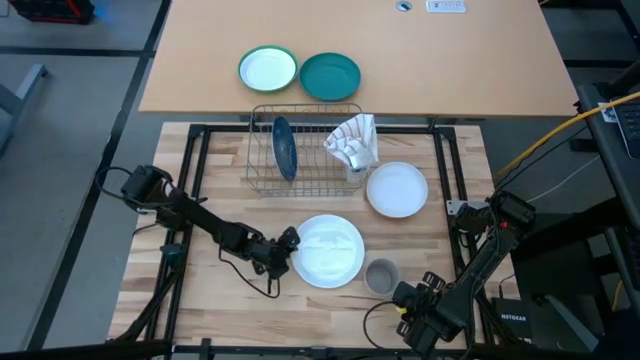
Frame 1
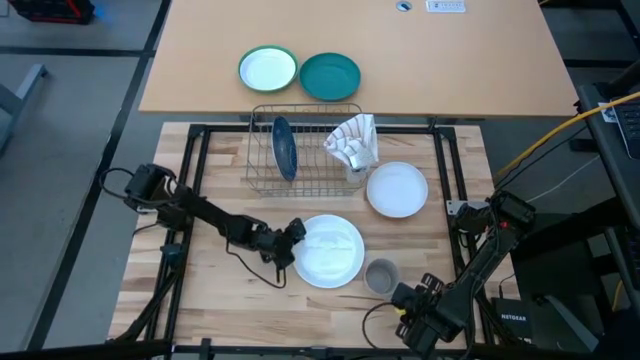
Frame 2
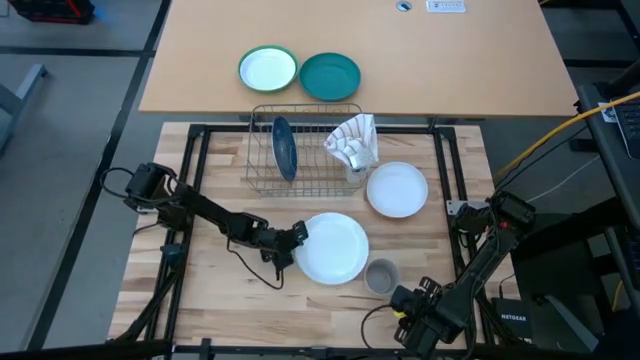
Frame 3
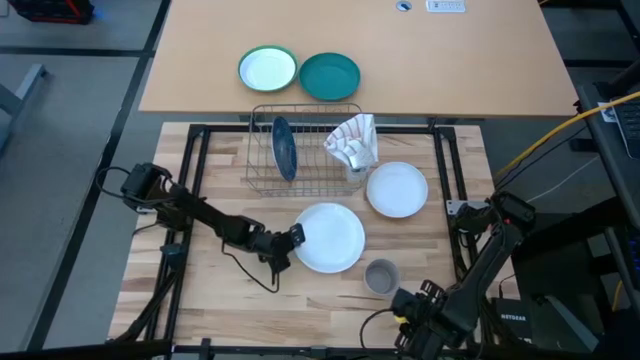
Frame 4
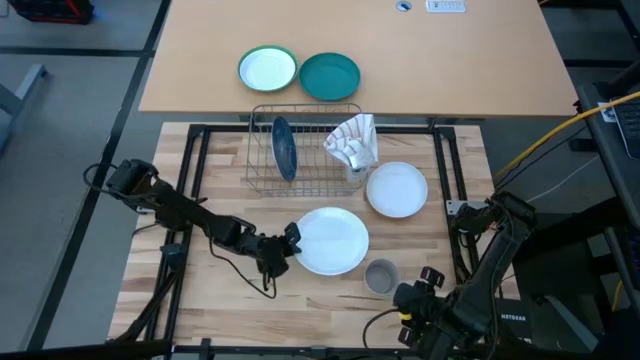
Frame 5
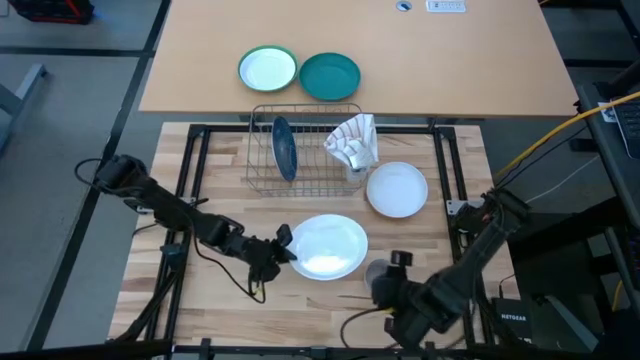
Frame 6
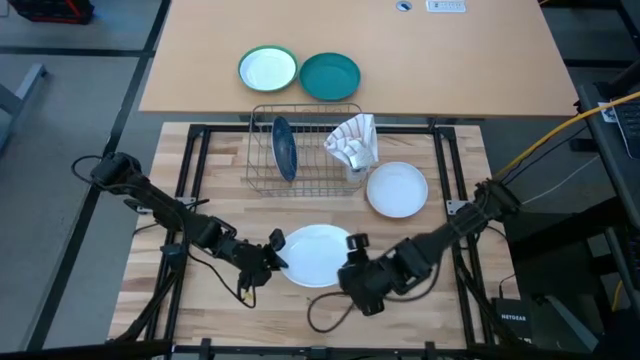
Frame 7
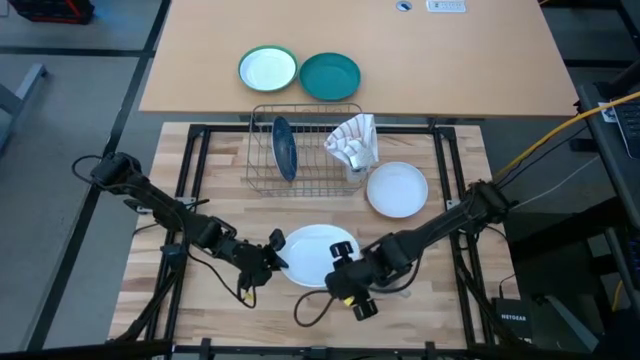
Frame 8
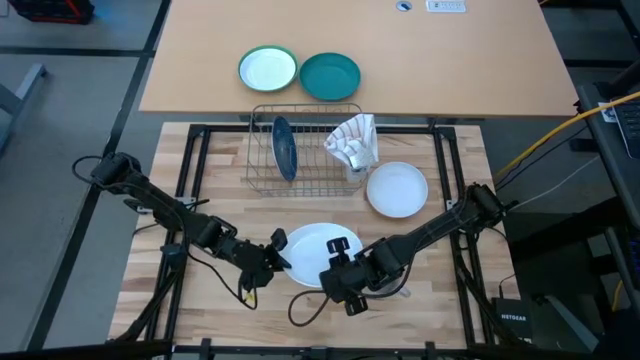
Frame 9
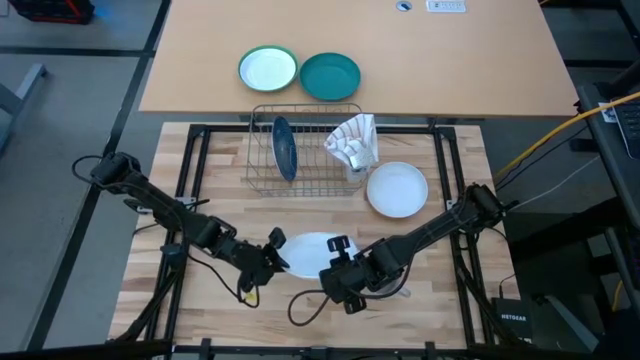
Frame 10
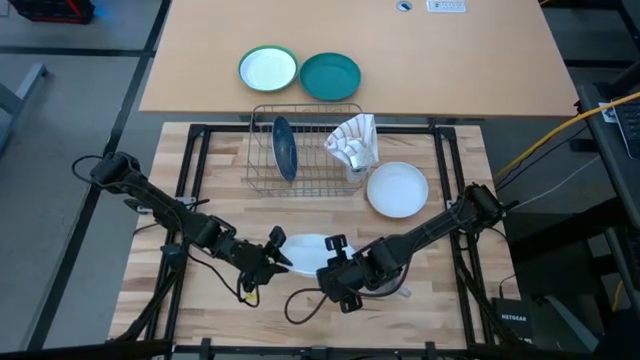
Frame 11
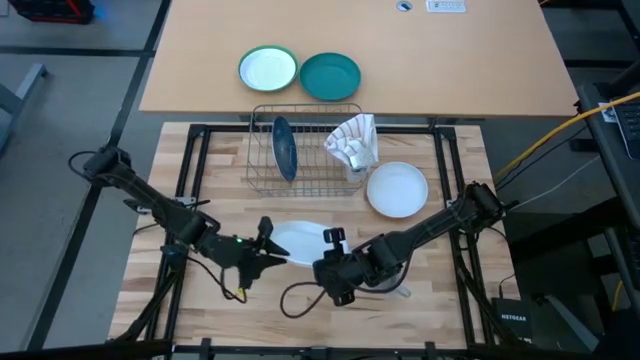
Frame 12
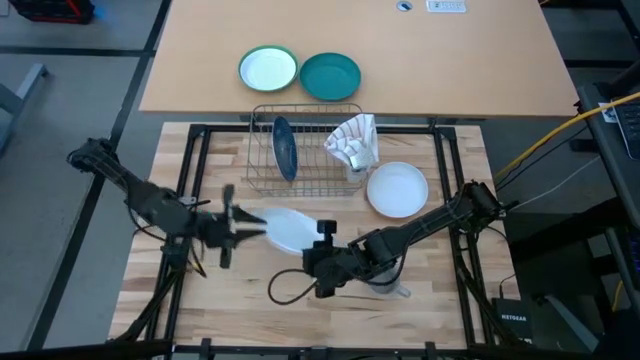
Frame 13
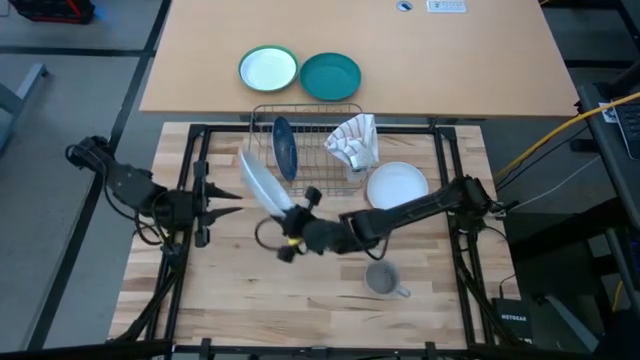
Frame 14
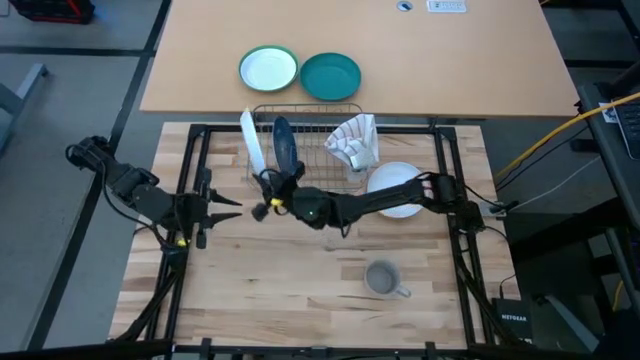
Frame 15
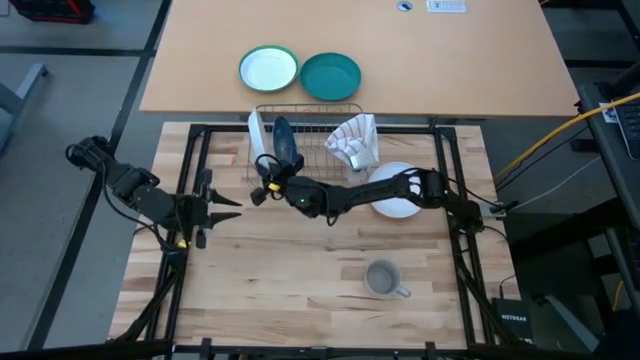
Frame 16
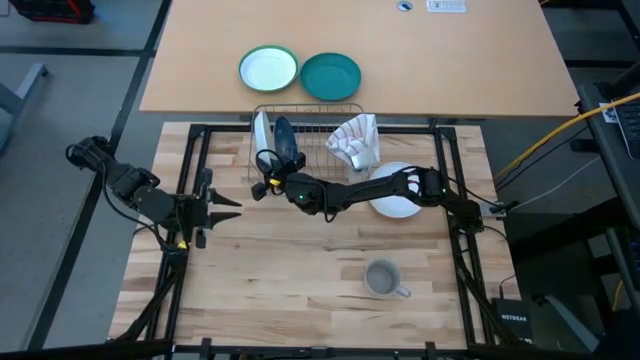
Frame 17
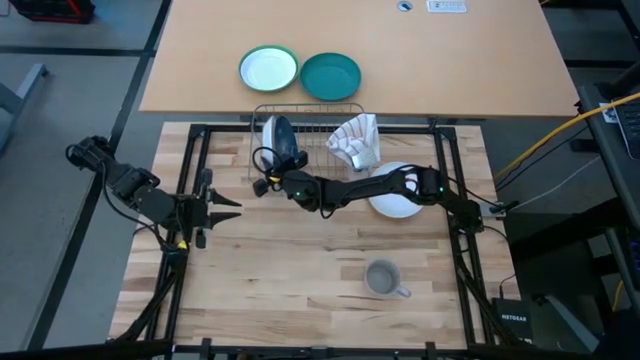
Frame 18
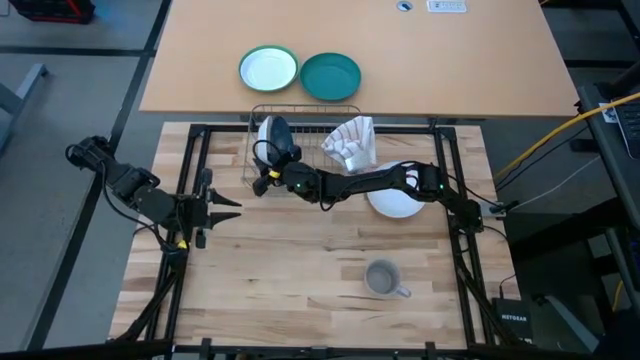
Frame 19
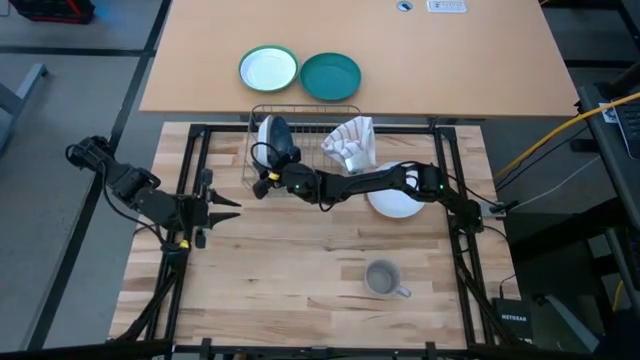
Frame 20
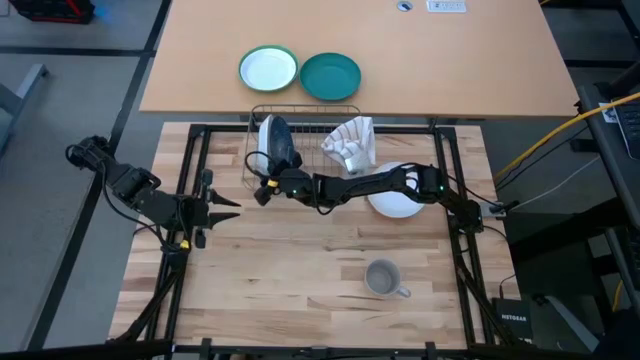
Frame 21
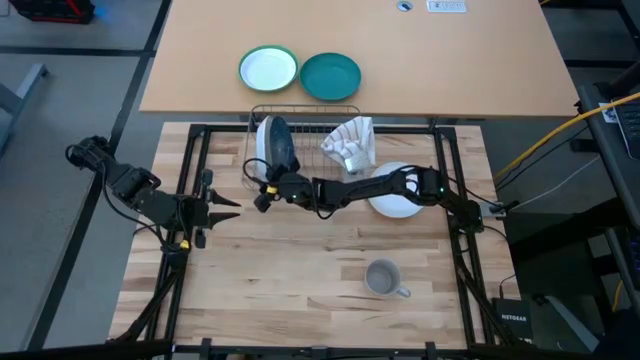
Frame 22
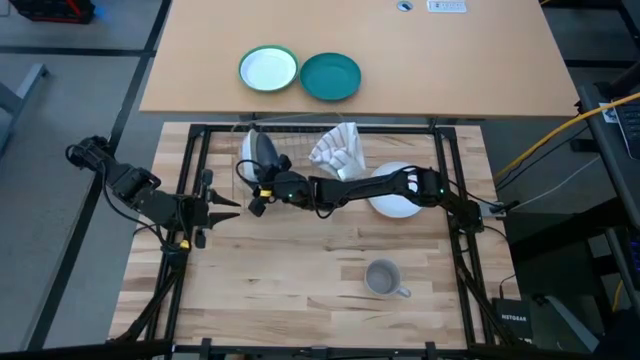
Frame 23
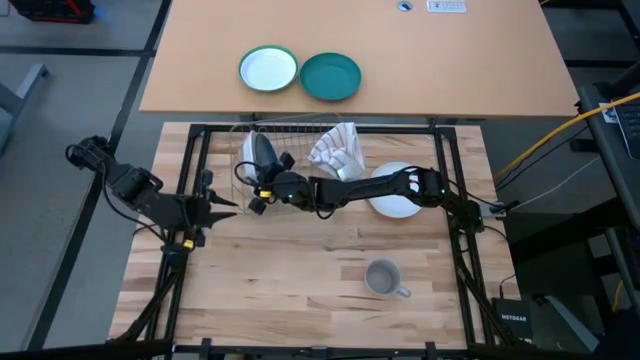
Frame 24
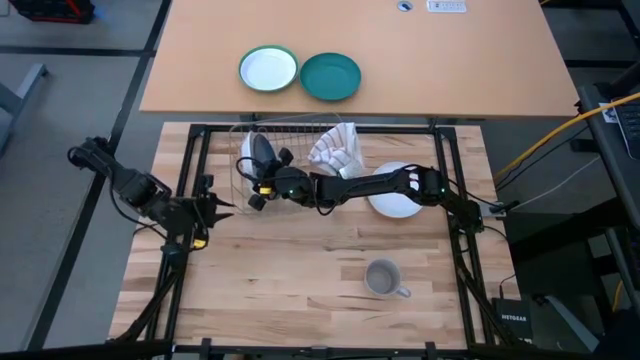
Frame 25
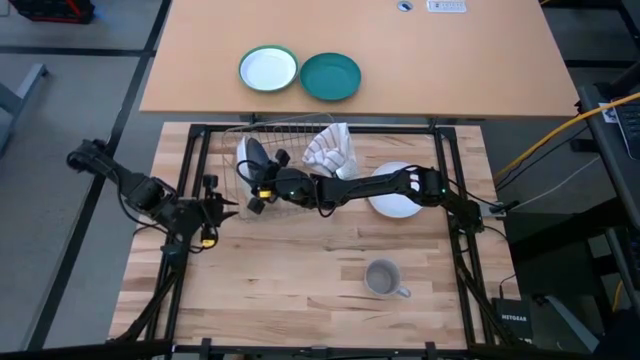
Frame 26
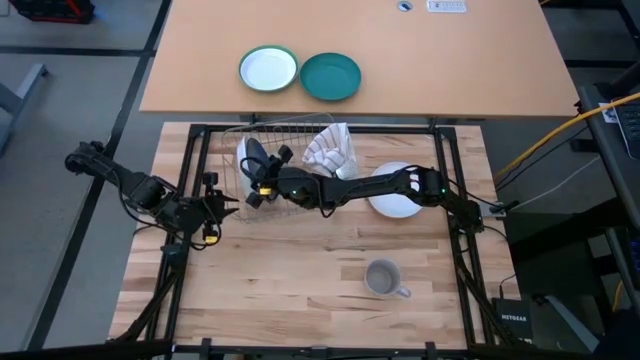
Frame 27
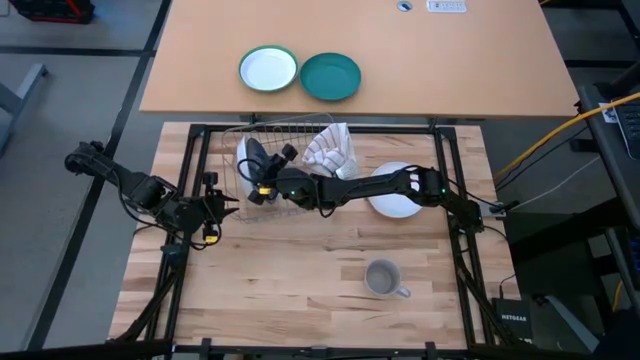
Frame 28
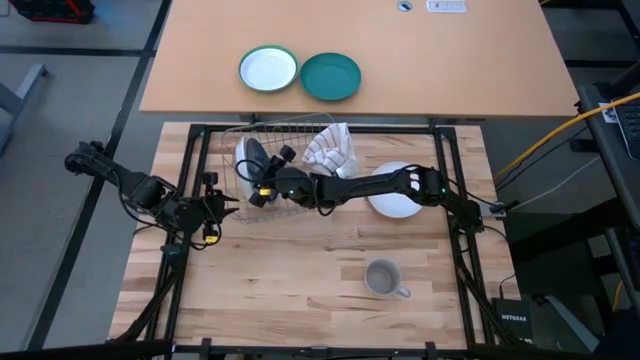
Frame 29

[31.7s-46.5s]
Task: Sort dishes
Put the left white plate in the dish rack

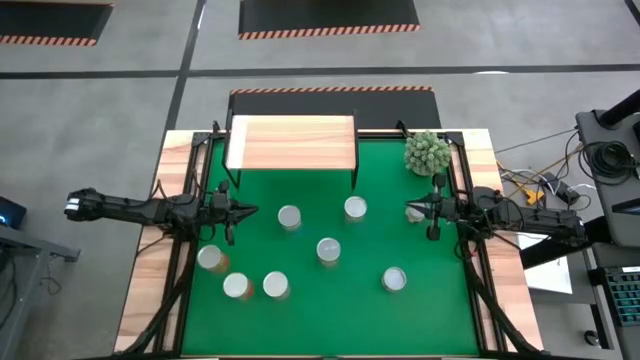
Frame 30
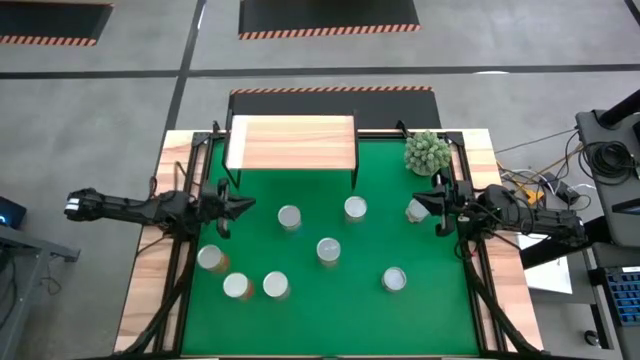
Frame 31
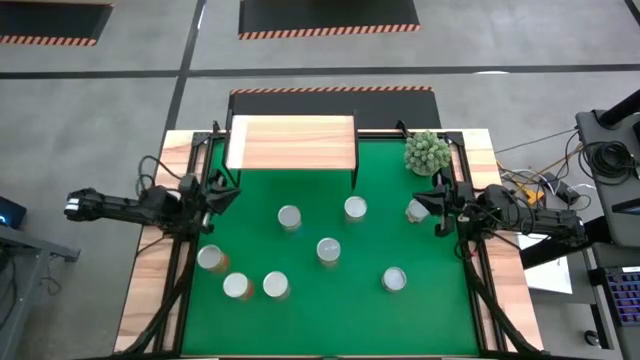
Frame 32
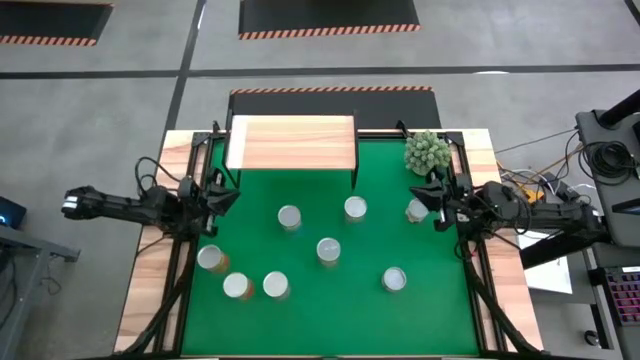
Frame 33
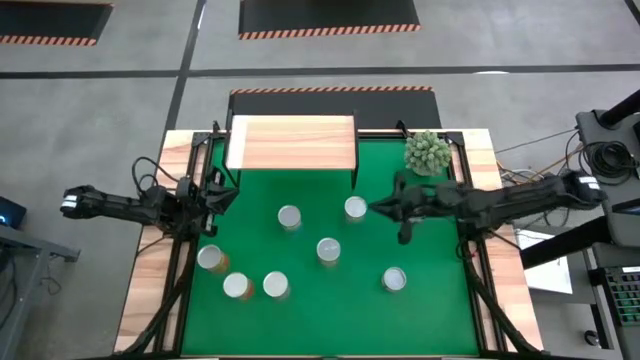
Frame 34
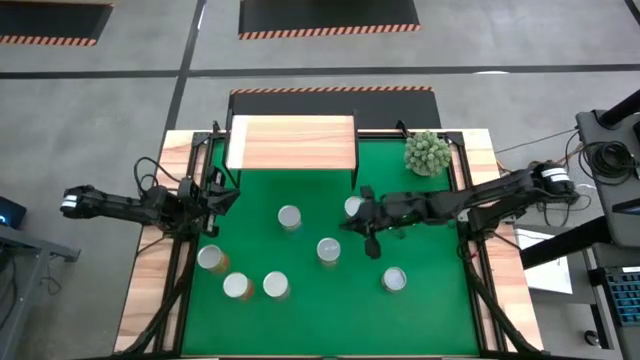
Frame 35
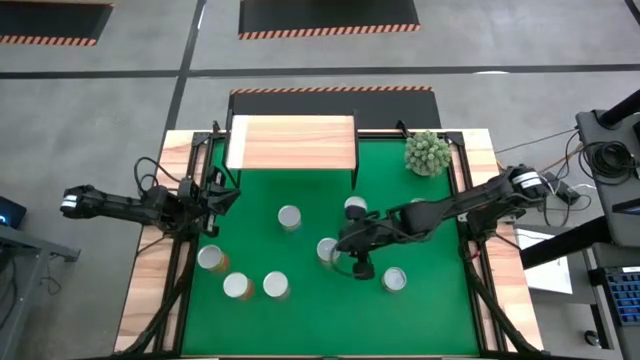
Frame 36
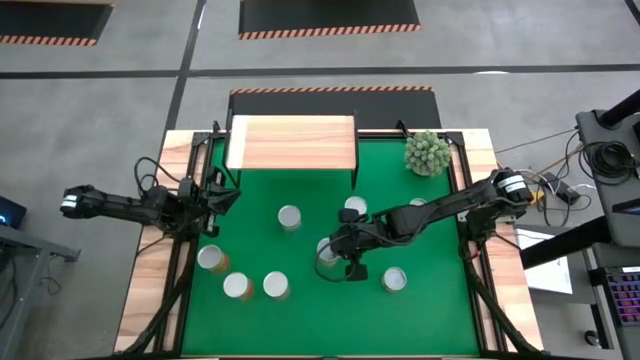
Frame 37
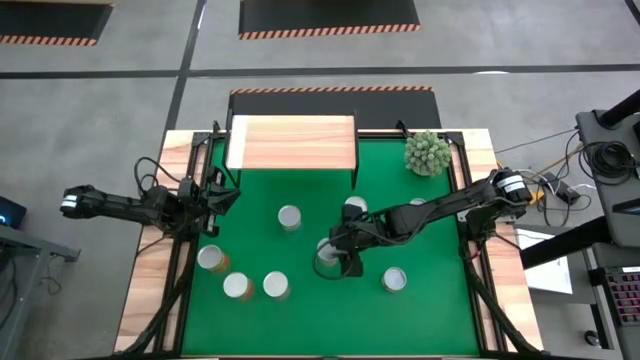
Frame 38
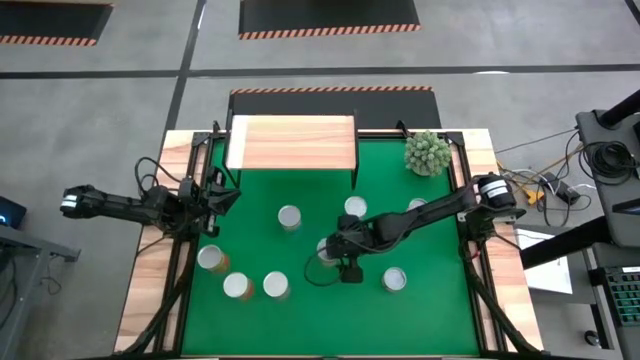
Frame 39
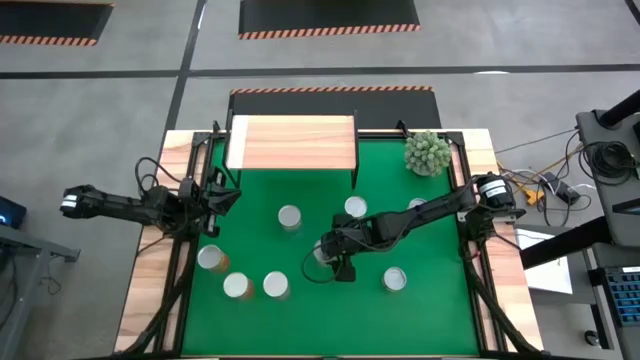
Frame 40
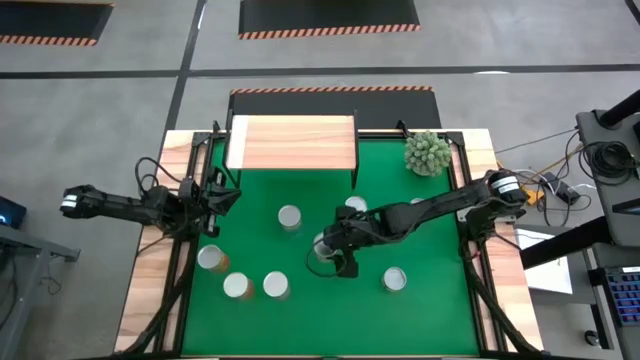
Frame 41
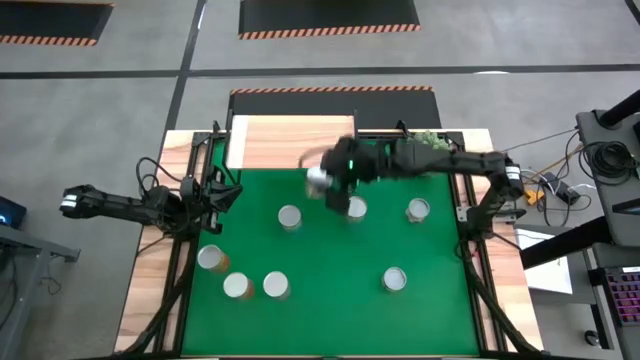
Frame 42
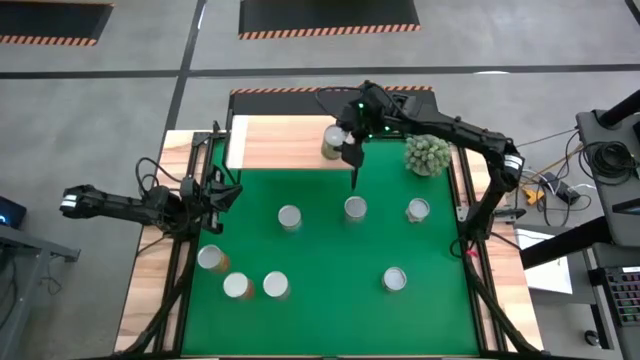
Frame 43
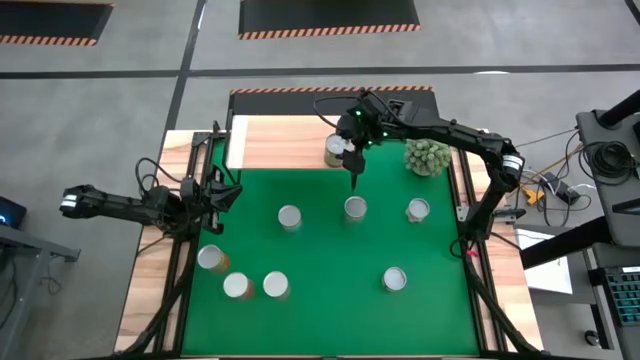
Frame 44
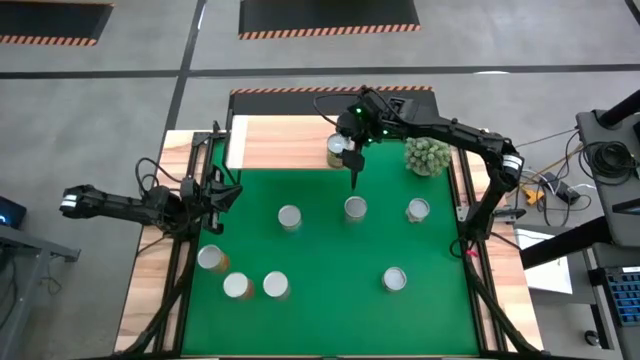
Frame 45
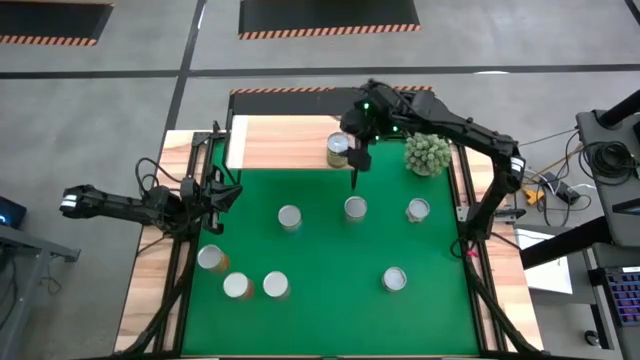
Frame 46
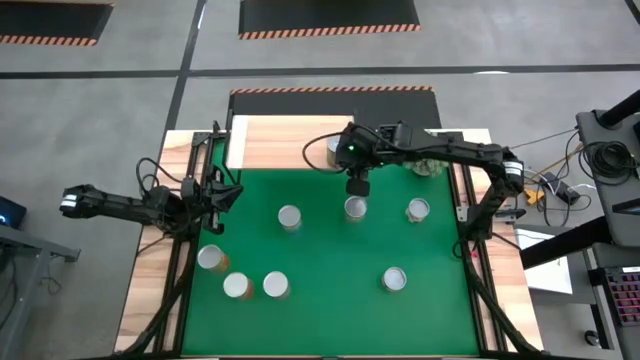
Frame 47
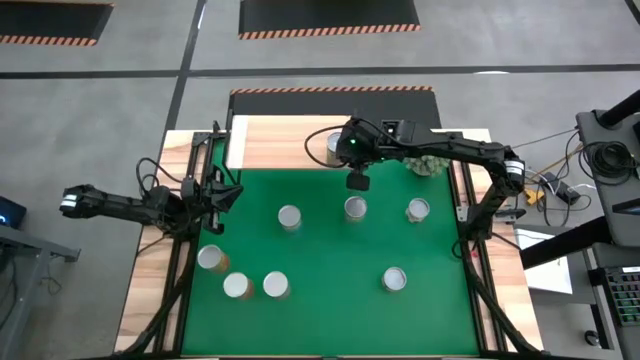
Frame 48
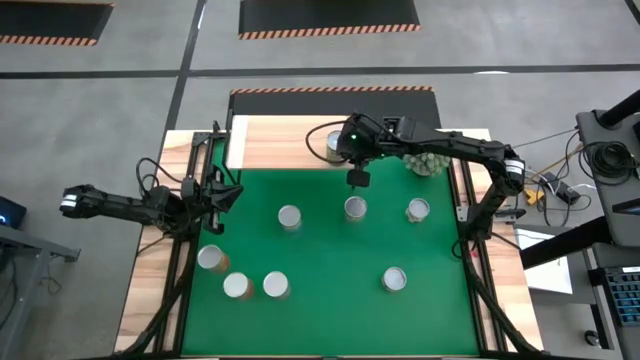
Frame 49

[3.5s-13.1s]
Task: Pick and place cans onto a shelf
Put the canned oranges on the shelf
